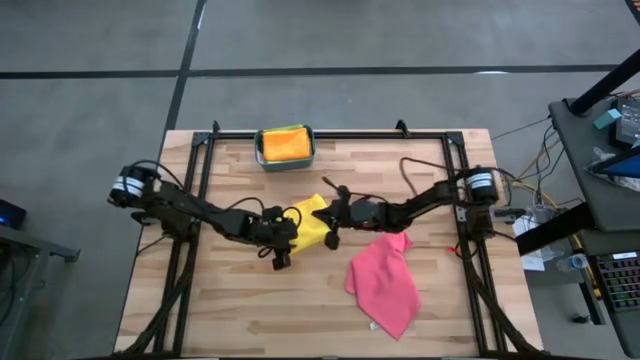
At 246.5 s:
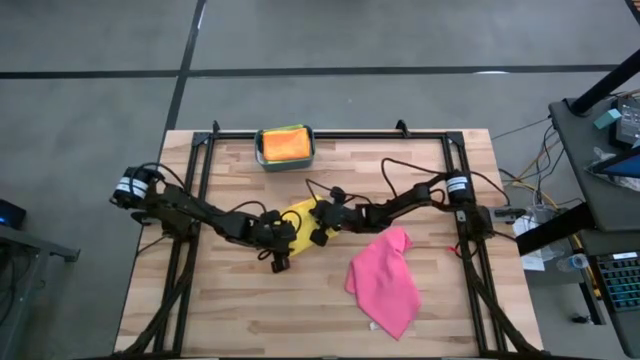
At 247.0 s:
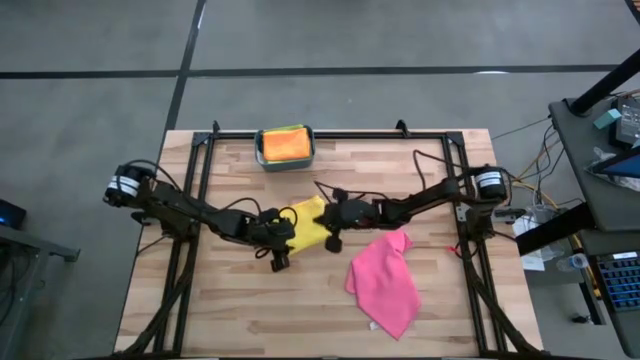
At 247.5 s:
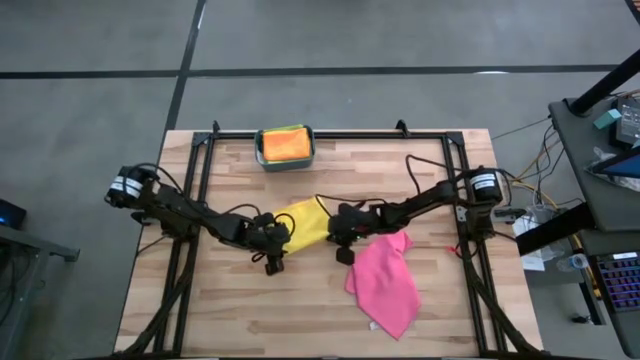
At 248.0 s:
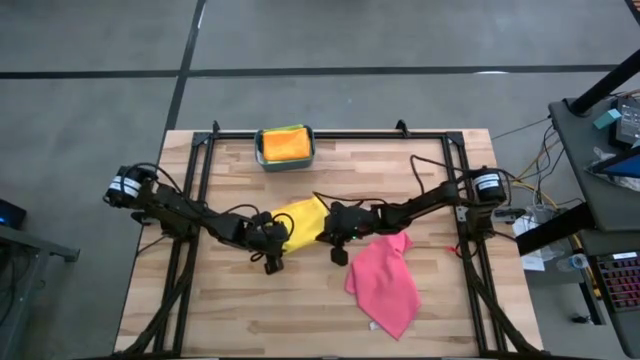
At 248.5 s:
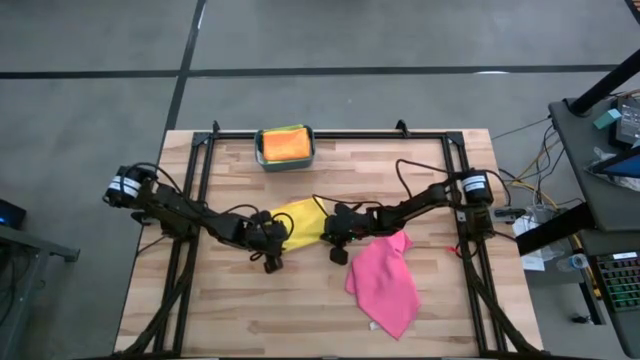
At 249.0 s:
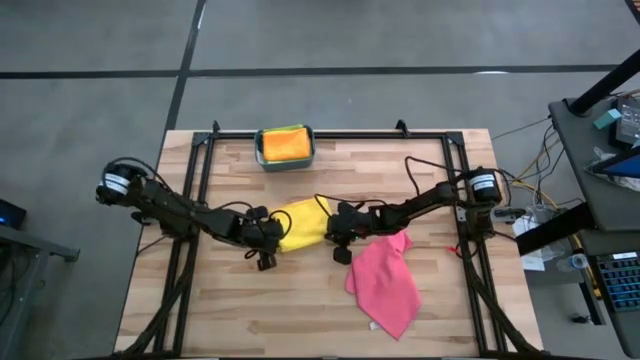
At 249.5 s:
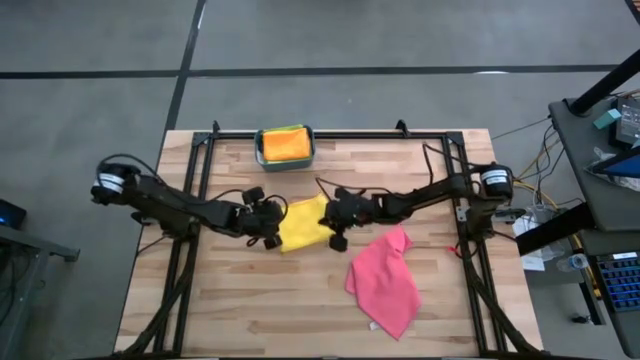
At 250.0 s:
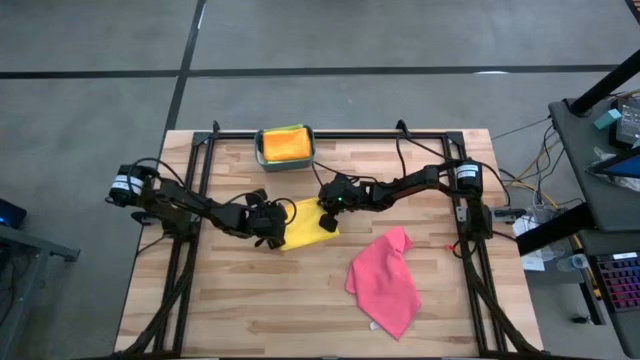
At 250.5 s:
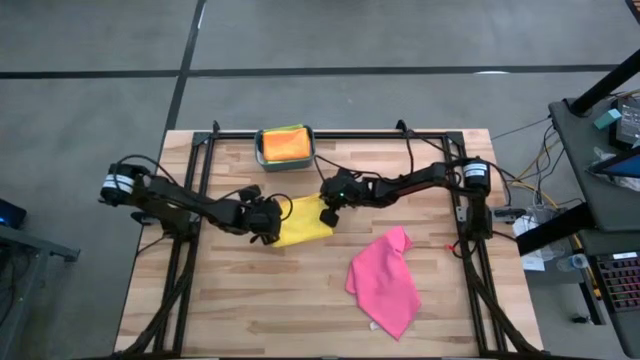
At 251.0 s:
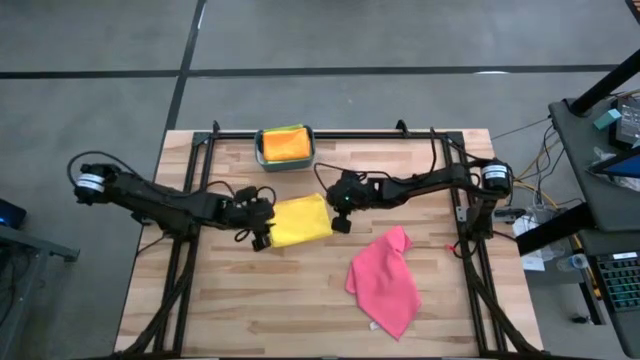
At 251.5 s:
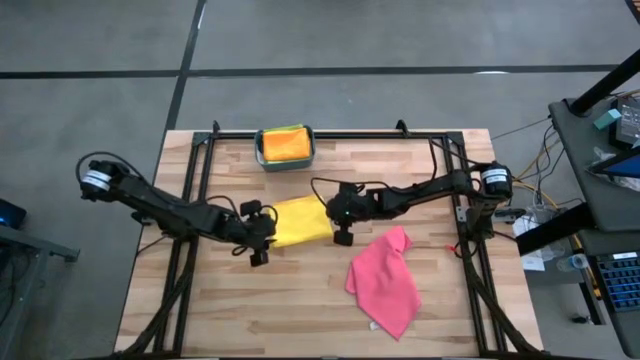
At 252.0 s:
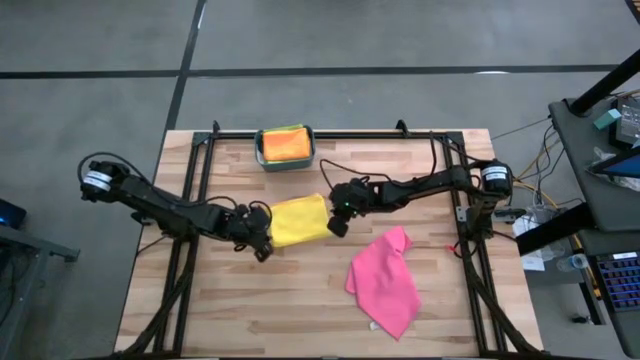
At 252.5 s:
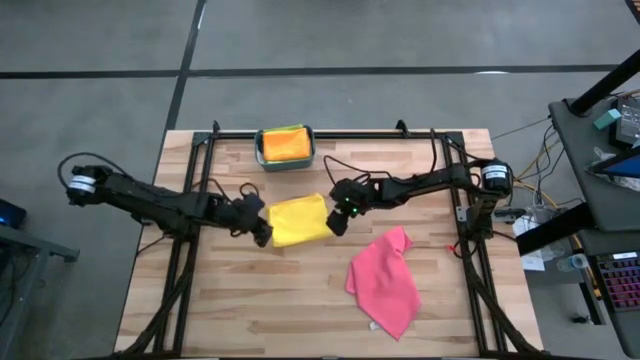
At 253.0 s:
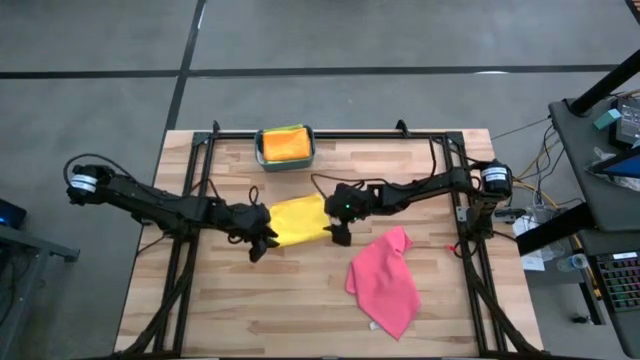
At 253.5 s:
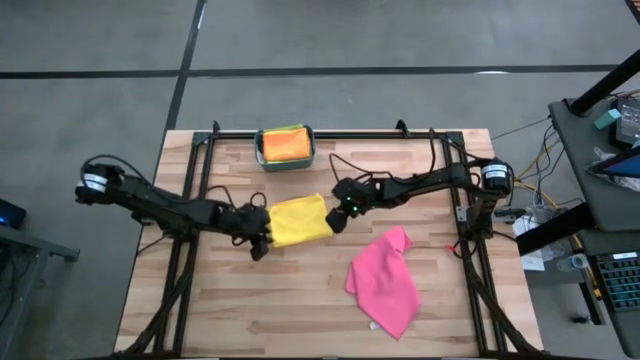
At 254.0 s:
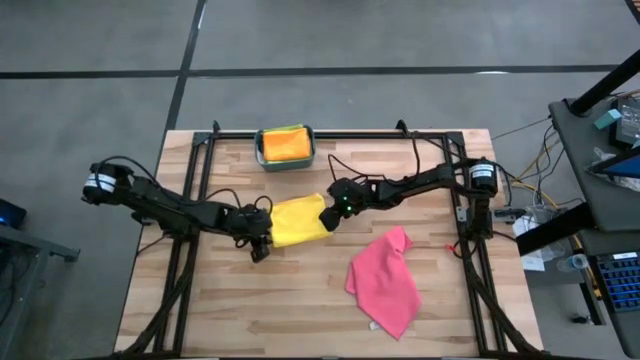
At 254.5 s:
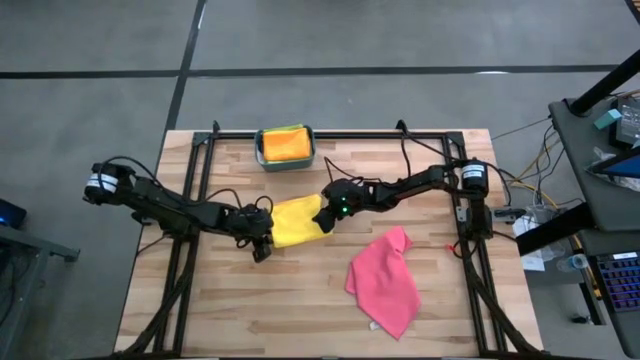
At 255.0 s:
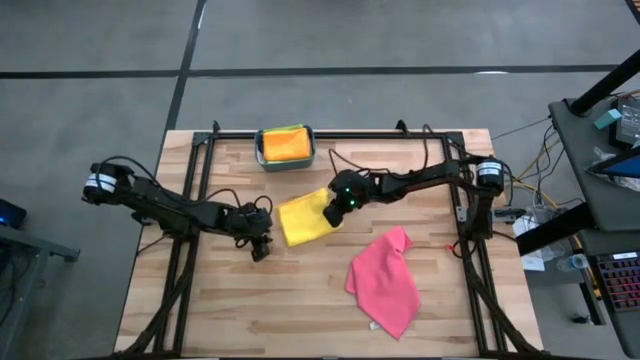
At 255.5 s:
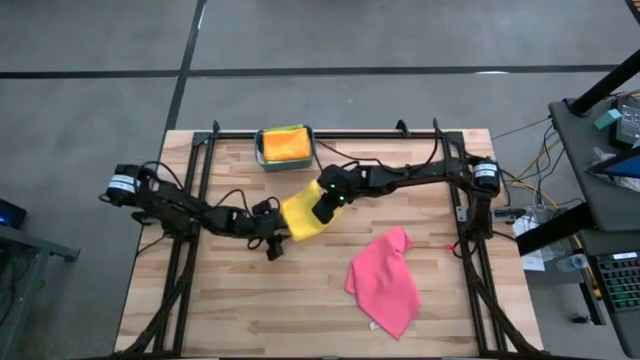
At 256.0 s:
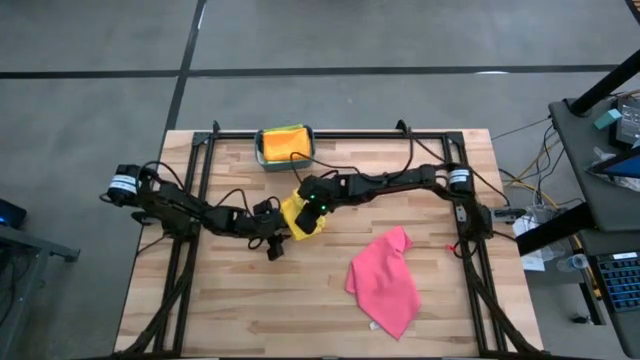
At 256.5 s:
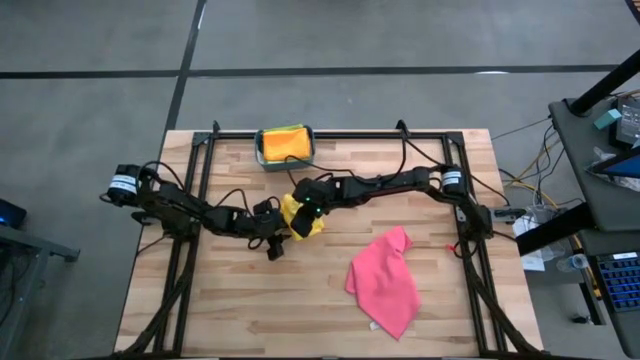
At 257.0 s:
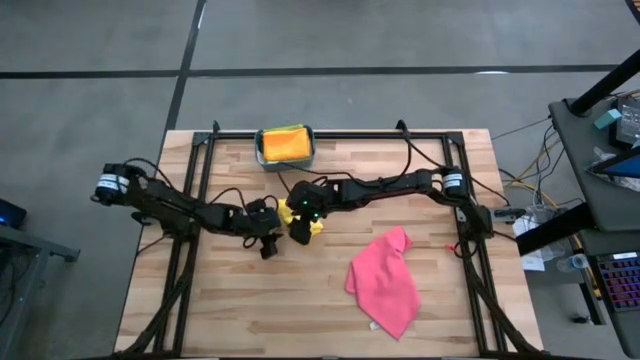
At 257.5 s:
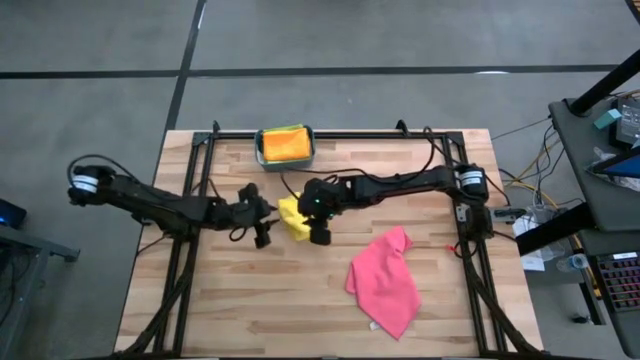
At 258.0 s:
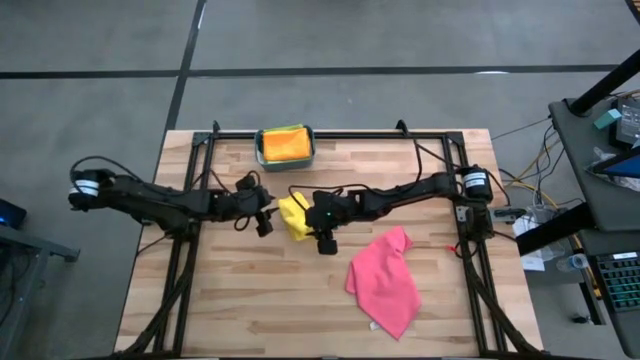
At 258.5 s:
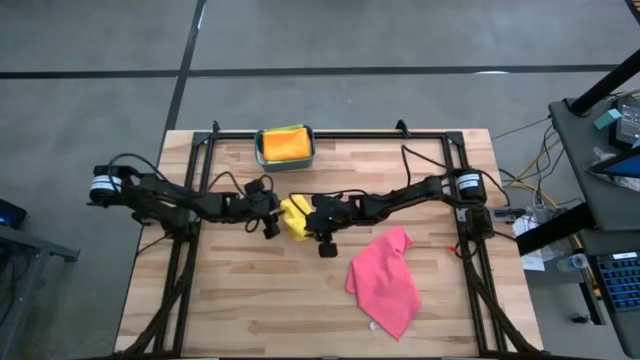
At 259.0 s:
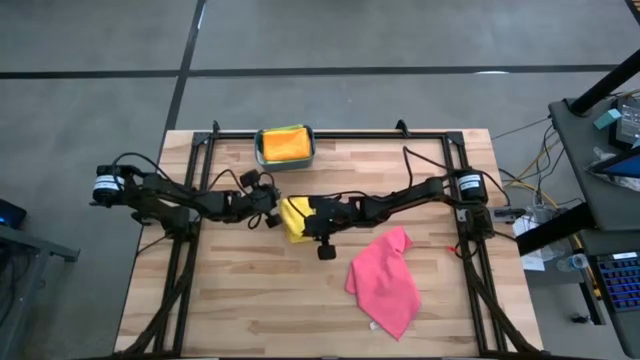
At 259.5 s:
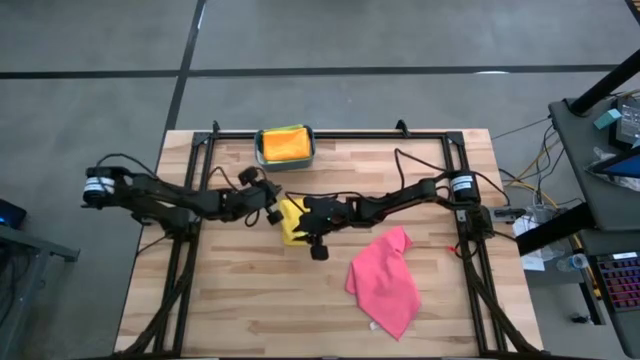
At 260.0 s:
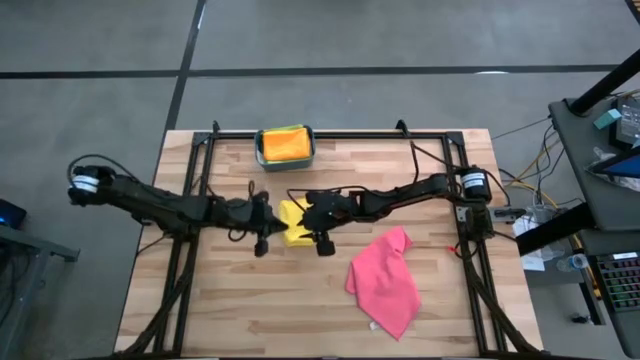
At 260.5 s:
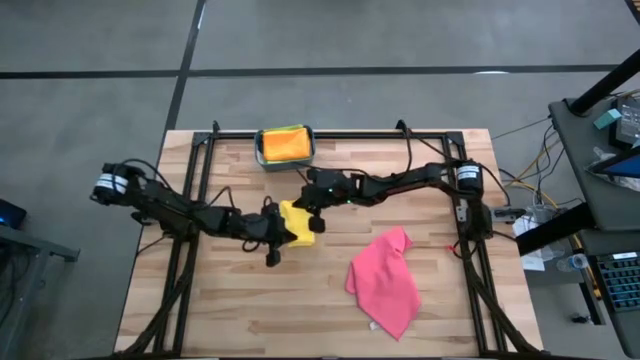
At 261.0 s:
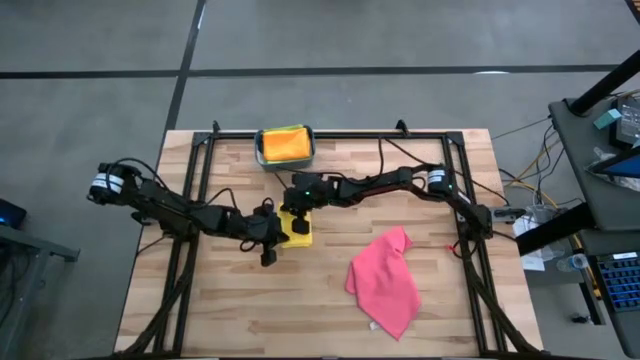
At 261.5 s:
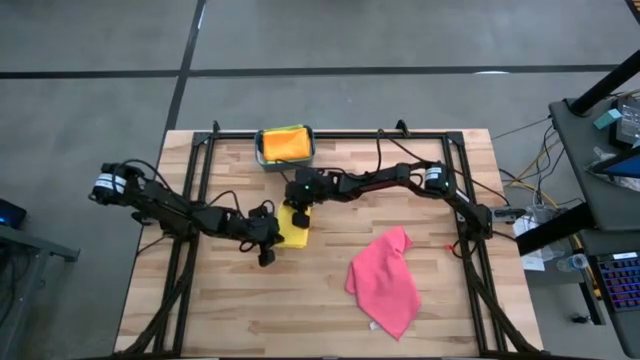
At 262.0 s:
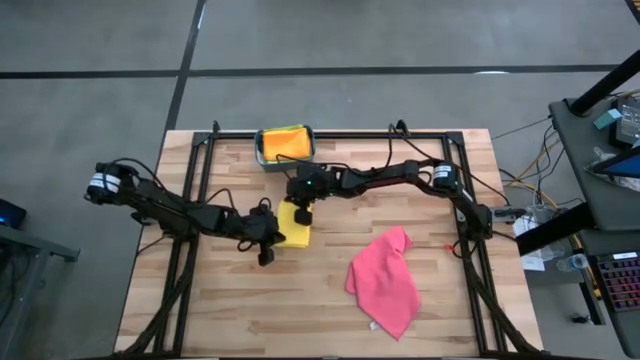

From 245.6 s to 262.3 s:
Task: Fold microfiber towels
Fold the yellow towel

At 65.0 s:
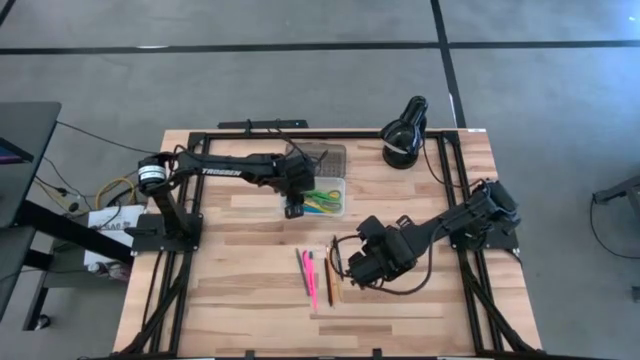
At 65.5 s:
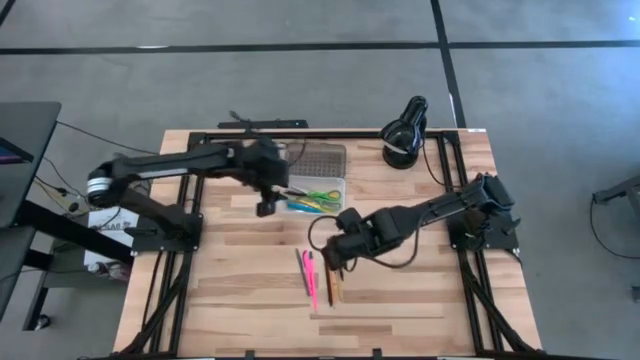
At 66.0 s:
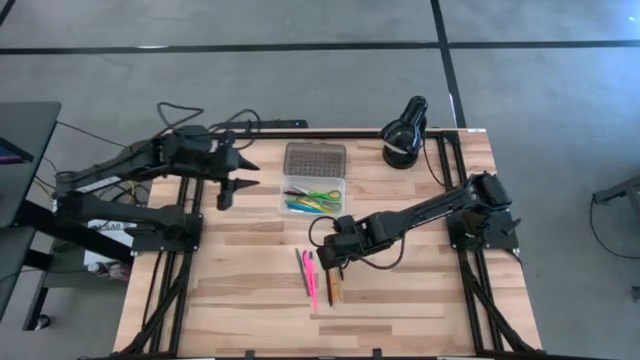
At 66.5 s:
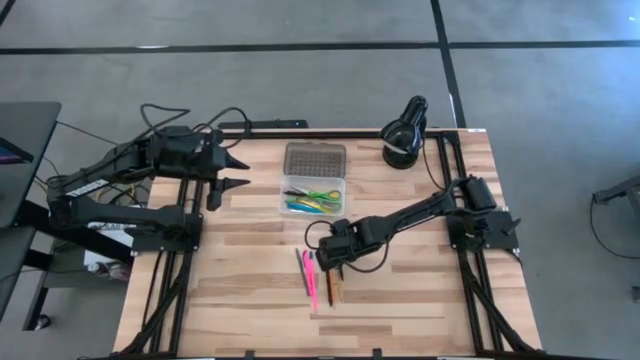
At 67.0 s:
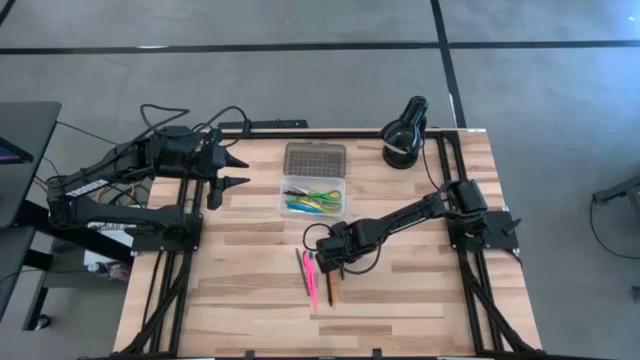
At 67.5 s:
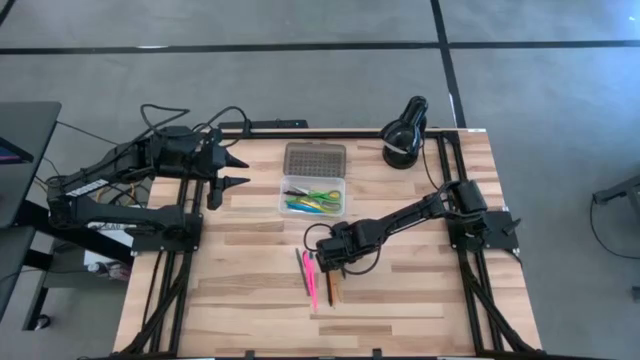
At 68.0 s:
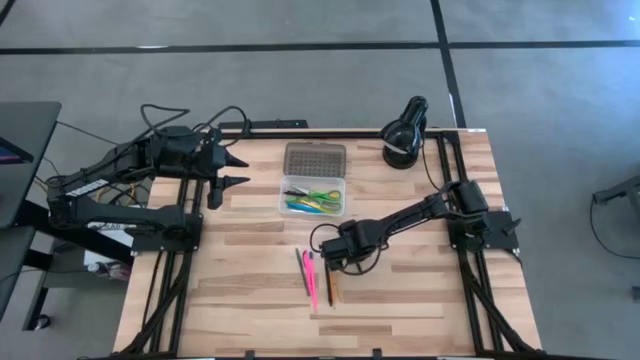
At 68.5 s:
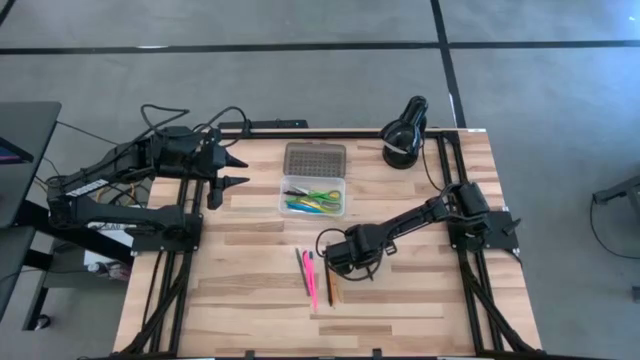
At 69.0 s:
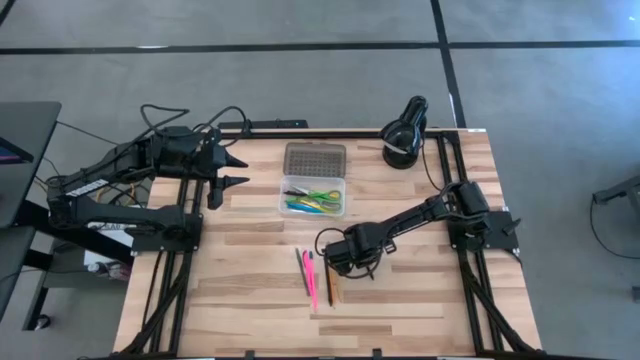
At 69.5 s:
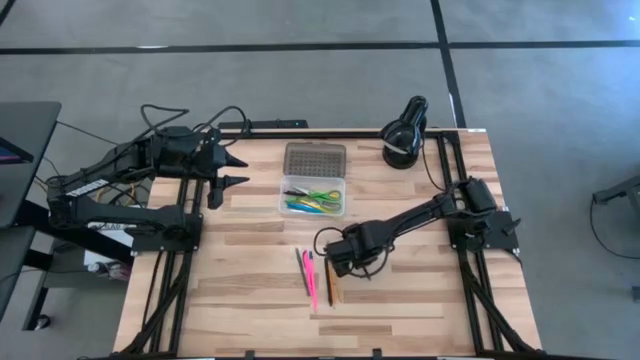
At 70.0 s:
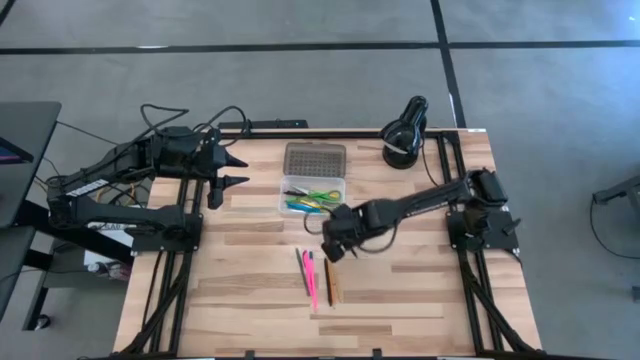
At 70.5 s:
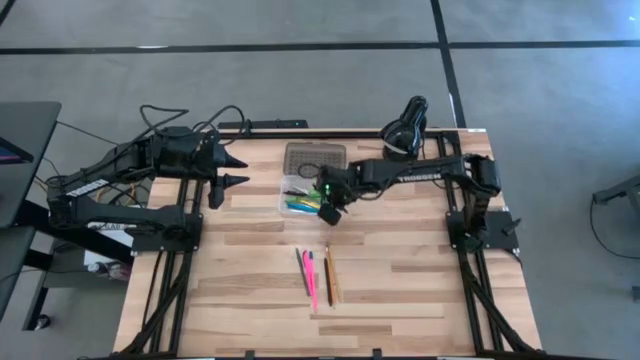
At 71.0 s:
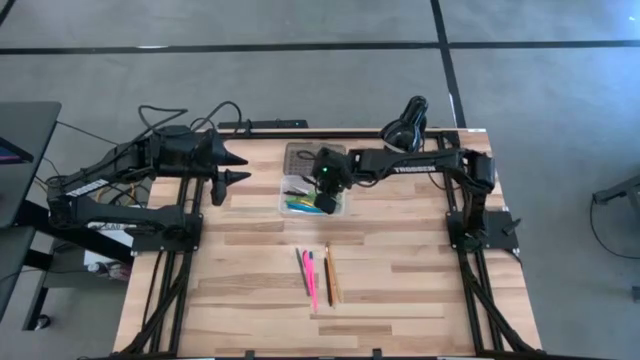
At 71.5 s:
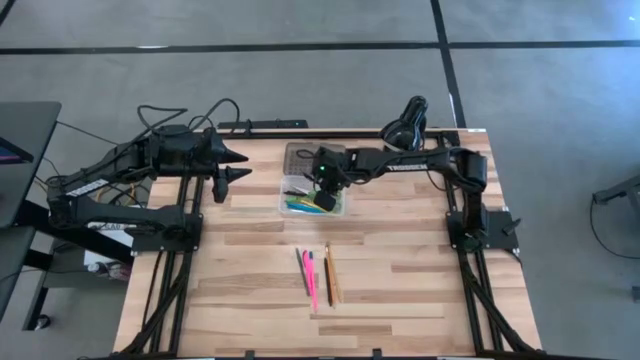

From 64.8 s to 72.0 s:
Task: Pick & place school supplies into a supply box
Put the right black pen into the supply box
